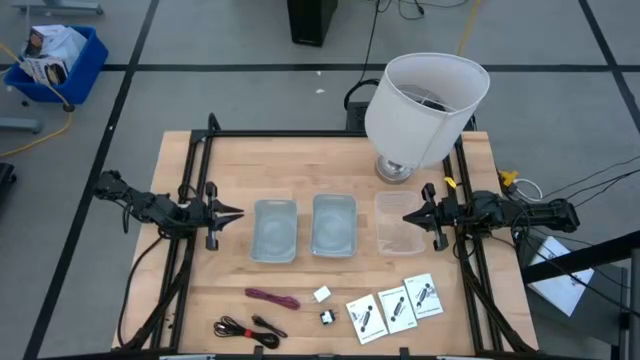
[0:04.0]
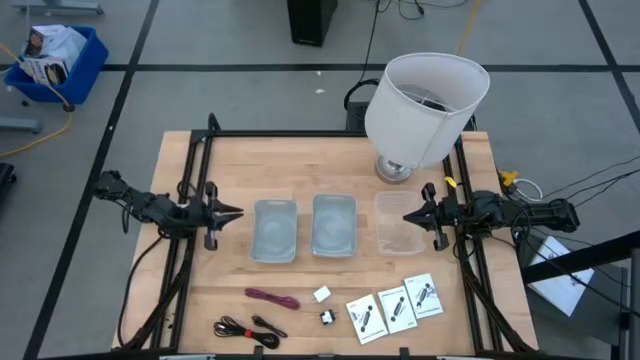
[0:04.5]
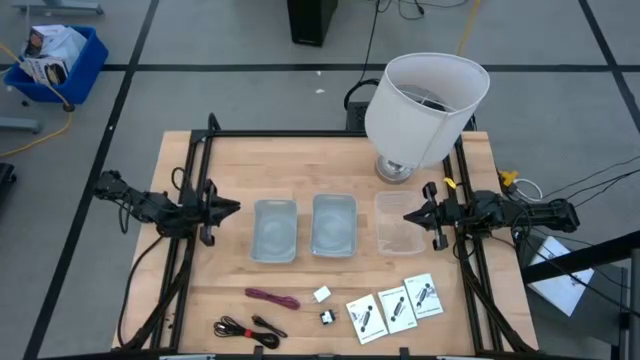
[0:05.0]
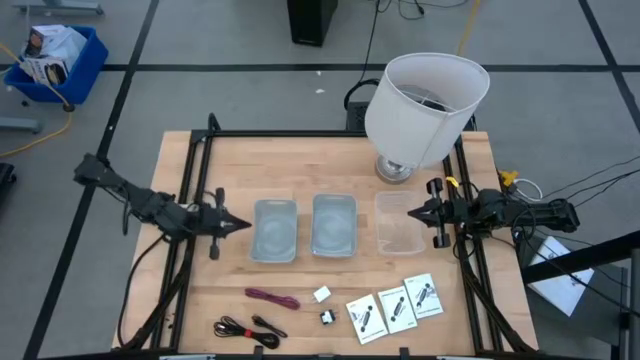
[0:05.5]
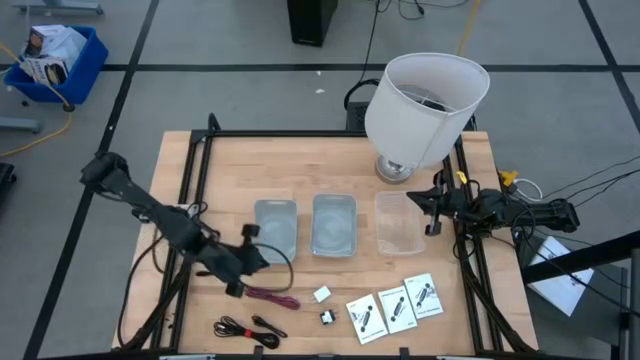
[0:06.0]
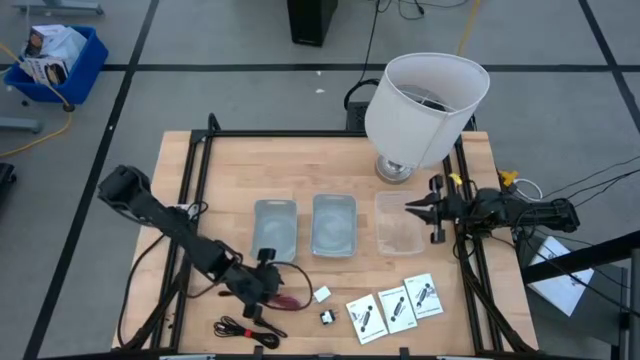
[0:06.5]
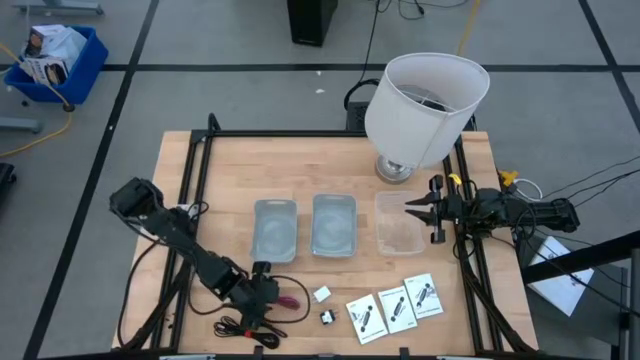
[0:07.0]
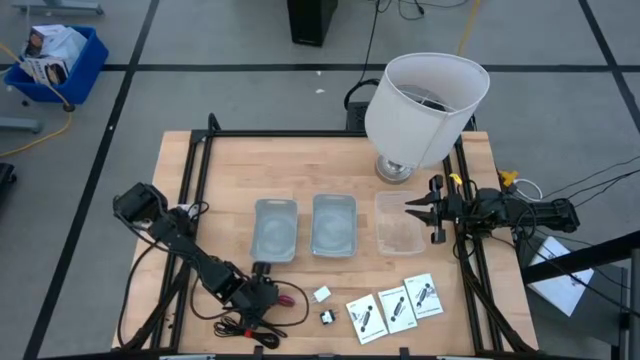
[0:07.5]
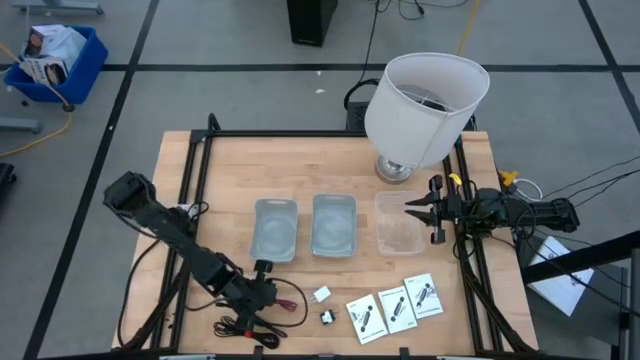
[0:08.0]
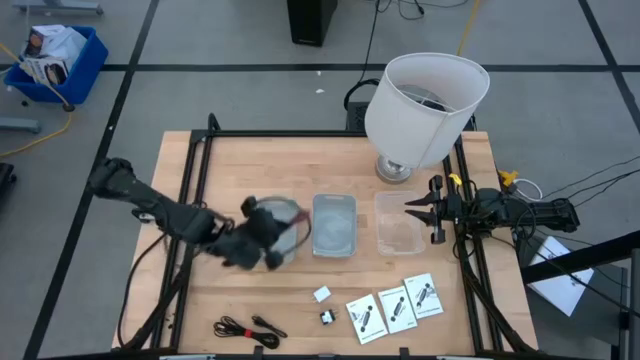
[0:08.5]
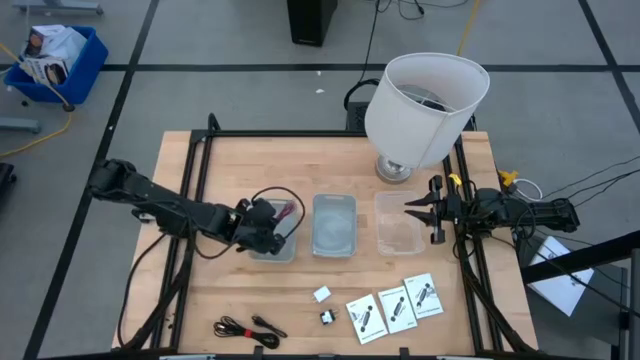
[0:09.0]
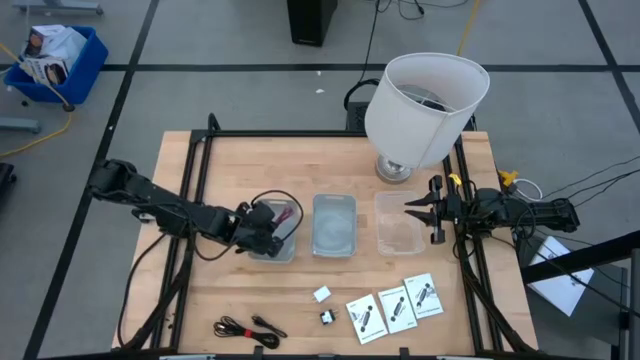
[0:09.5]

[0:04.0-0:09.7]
Task: Pick and place items into bin
Put the pink cable charger into the left gray bin

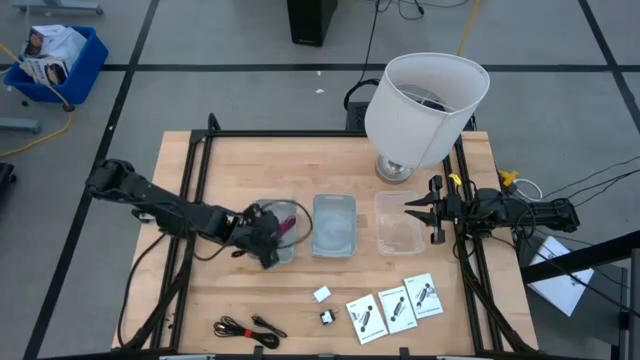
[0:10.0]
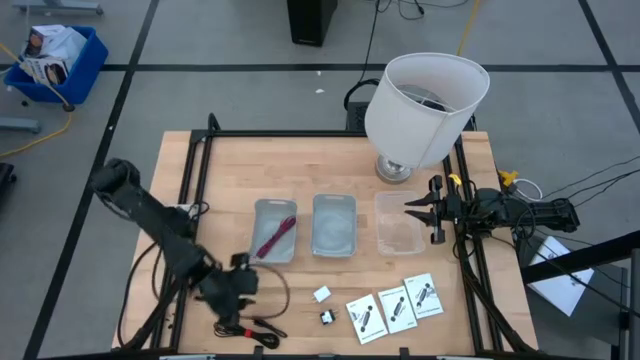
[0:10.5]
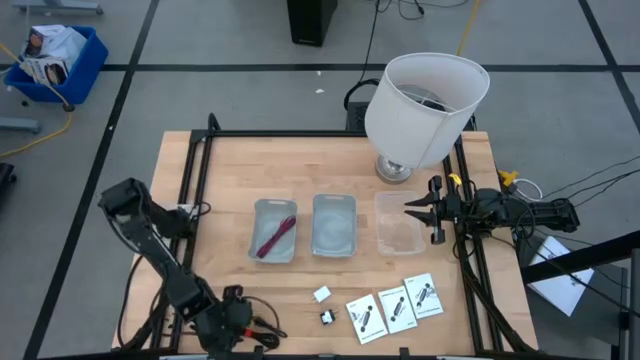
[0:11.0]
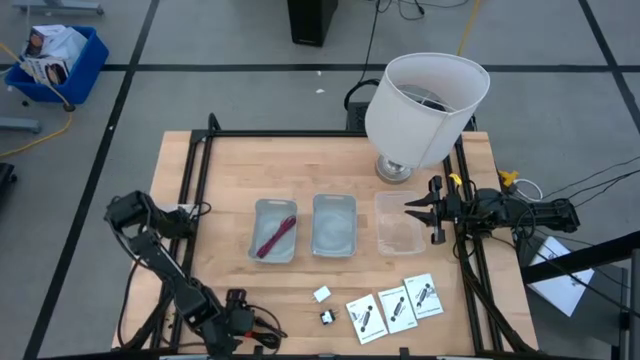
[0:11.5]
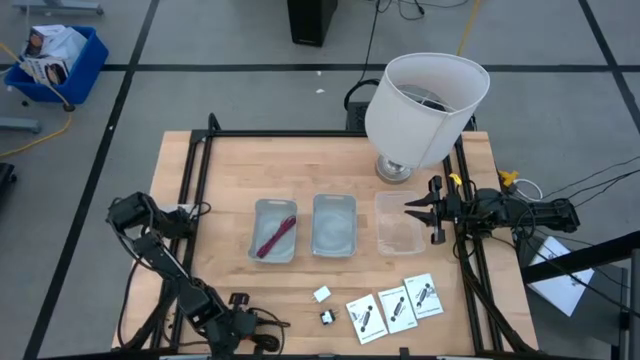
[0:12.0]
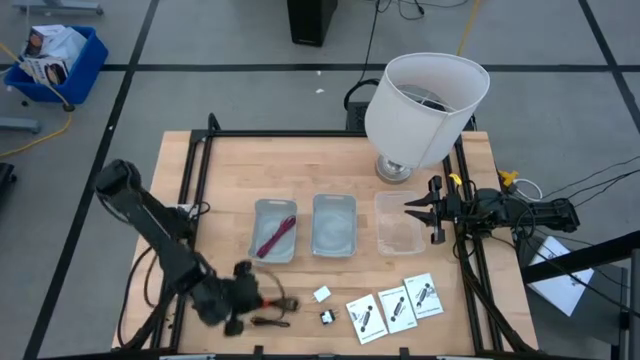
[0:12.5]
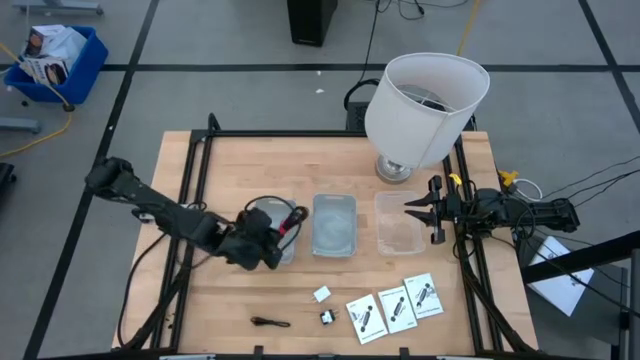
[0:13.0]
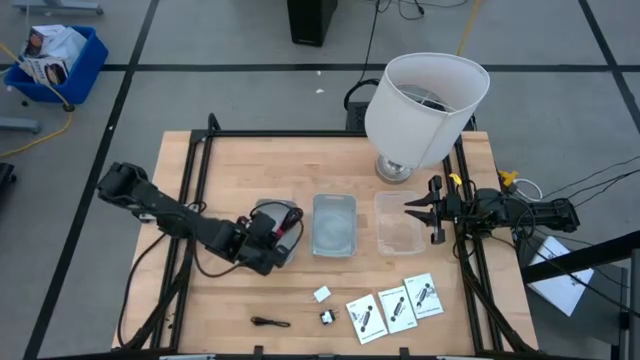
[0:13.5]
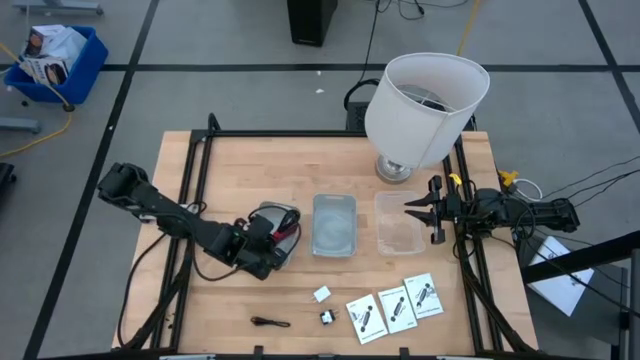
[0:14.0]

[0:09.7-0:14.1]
Put the black red cable charger into the left gray bin

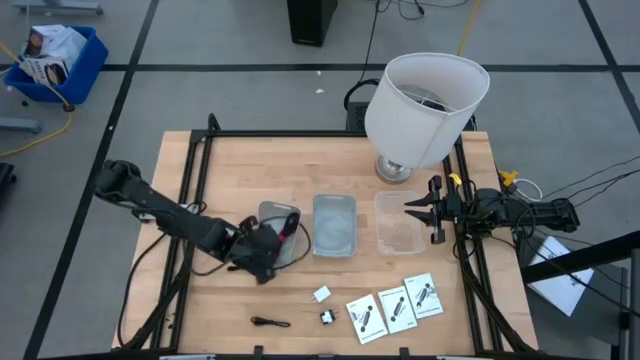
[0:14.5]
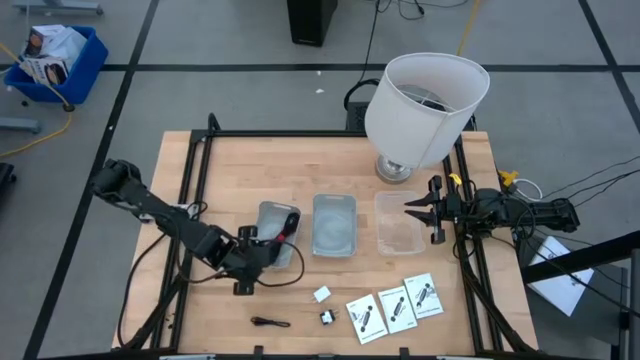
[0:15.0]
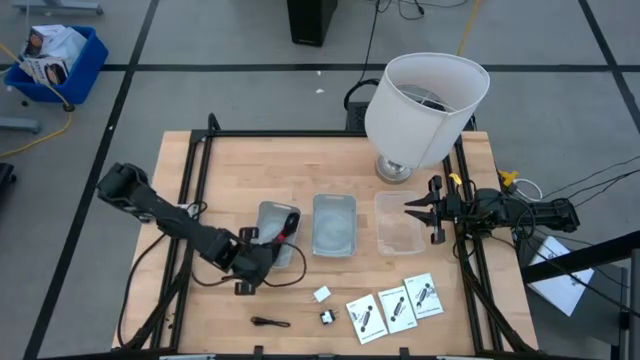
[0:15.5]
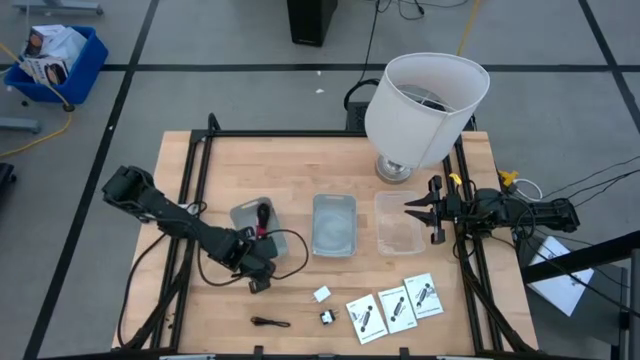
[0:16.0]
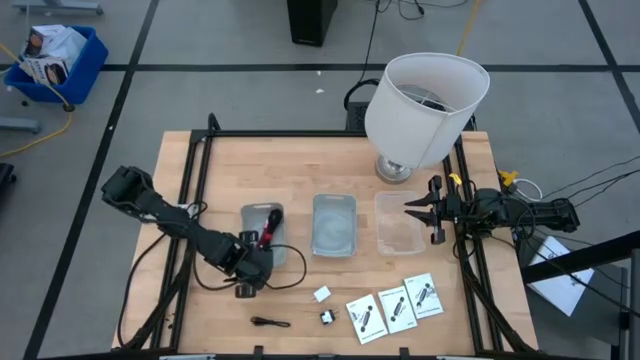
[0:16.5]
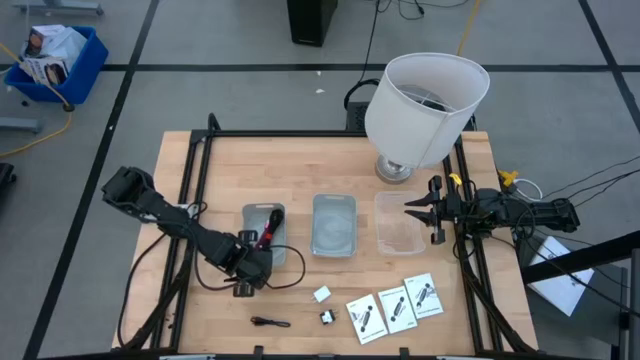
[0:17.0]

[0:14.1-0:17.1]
Adjust the left gray bin

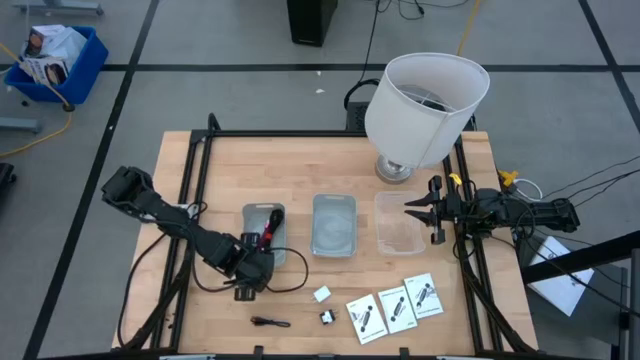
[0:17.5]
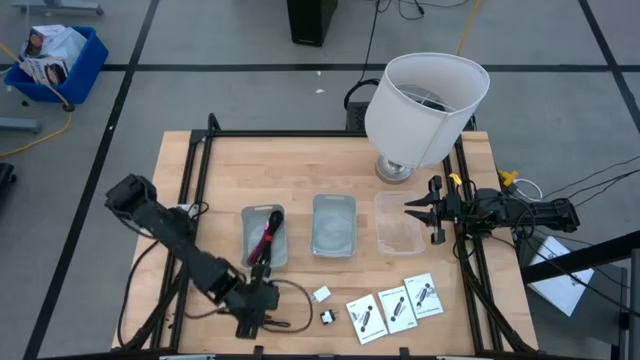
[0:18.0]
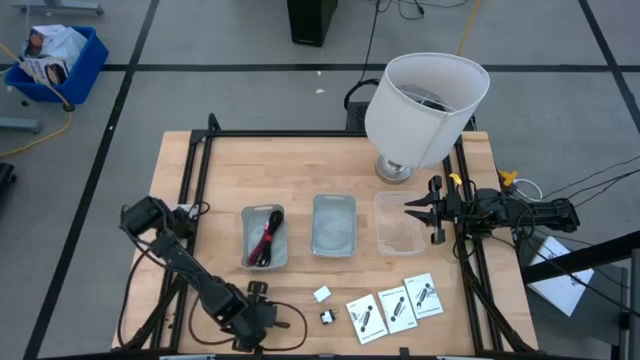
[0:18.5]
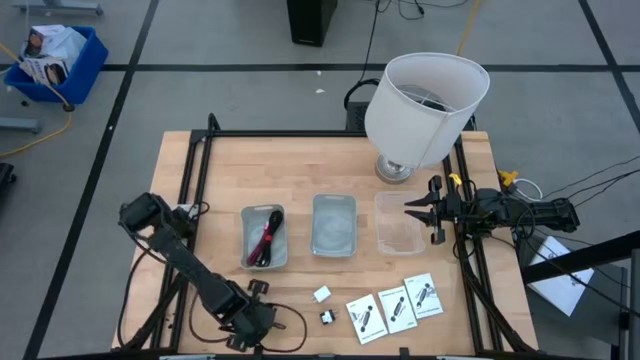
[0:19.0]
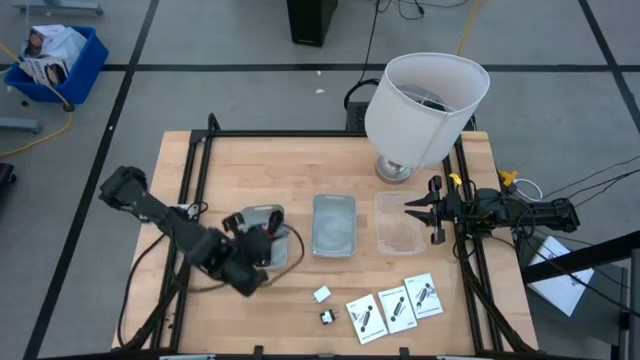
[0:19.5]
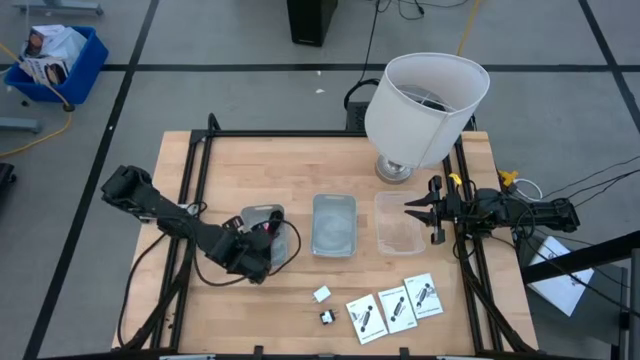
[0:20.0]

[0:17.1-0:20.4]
Put the black cable charger into the left gray bin

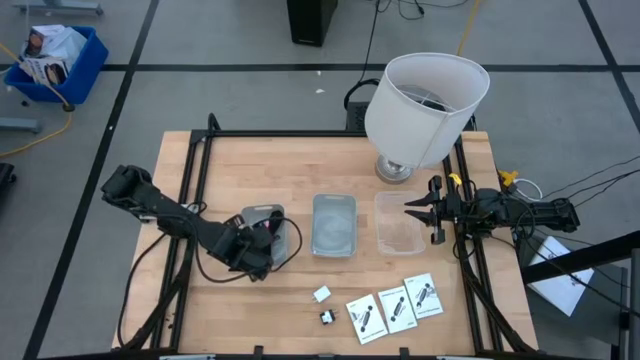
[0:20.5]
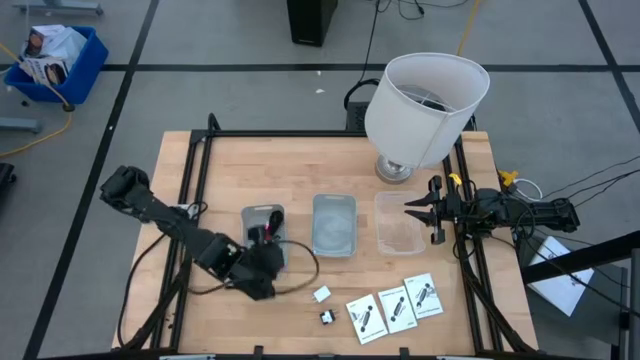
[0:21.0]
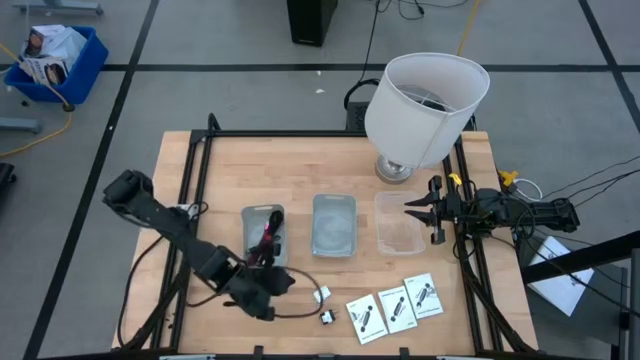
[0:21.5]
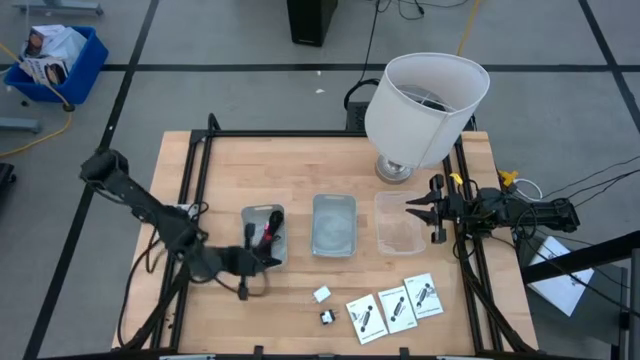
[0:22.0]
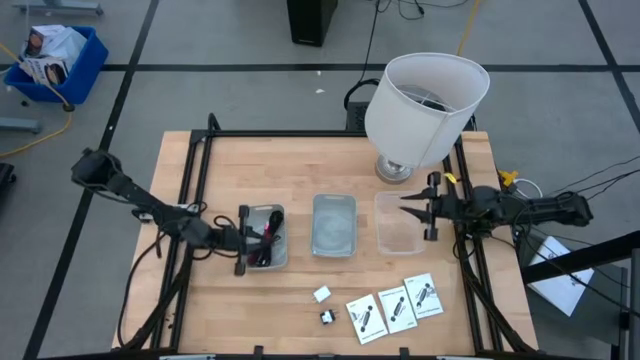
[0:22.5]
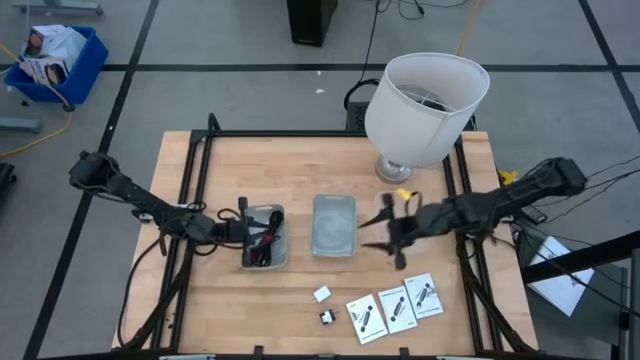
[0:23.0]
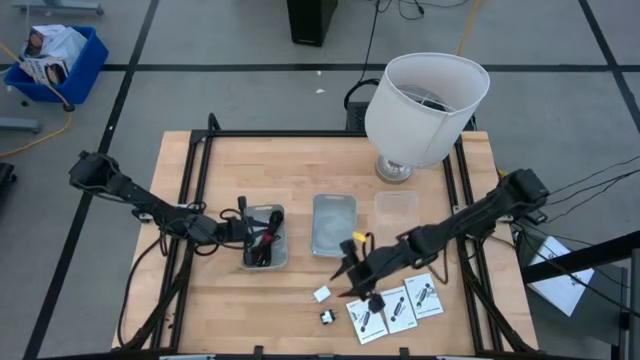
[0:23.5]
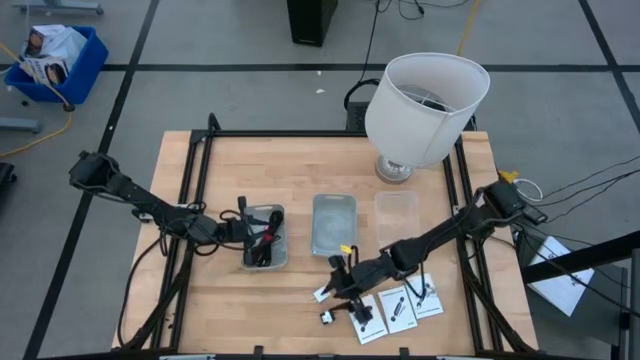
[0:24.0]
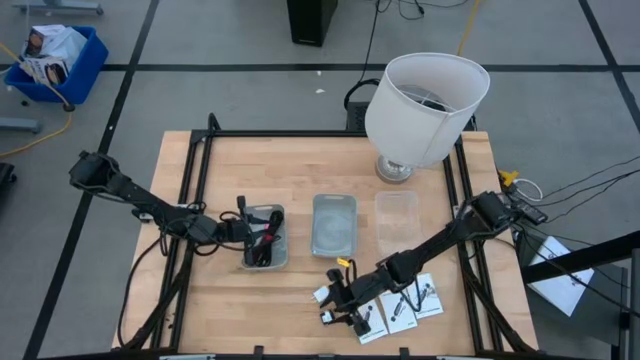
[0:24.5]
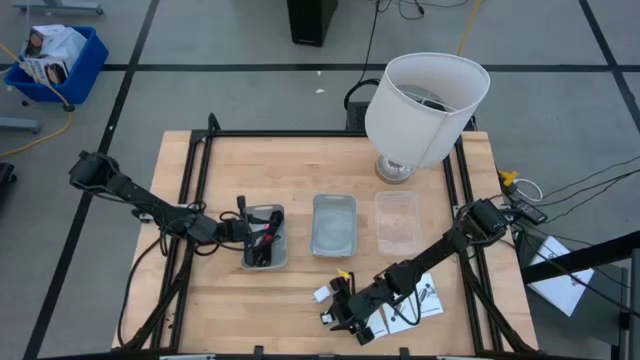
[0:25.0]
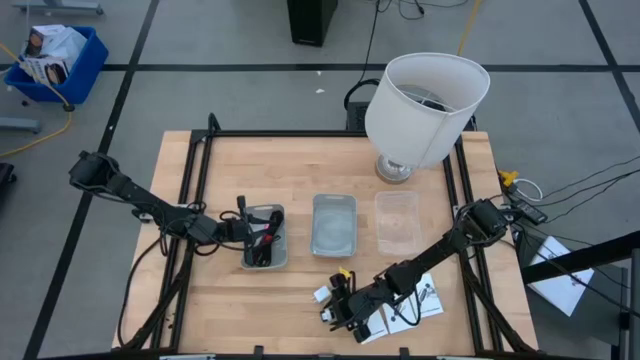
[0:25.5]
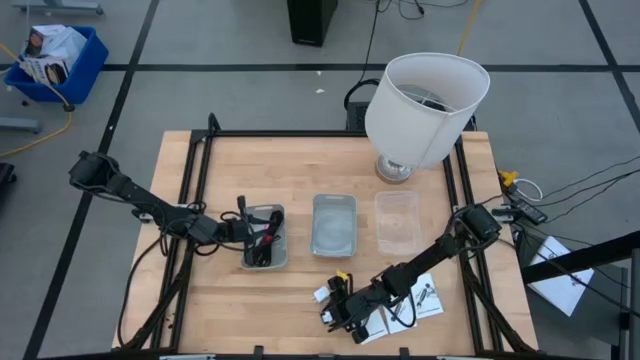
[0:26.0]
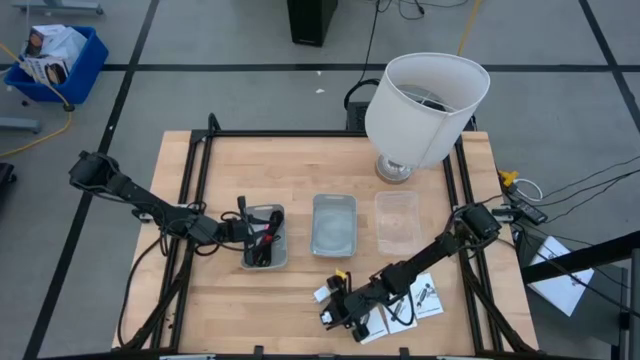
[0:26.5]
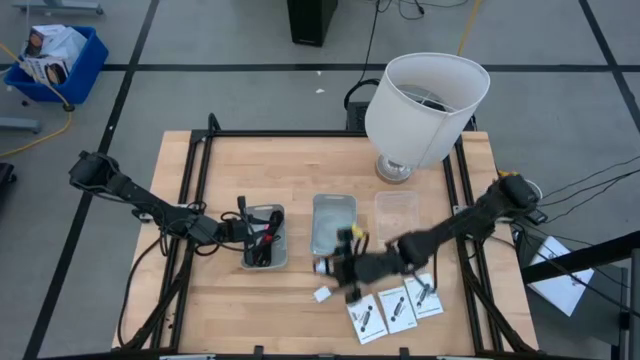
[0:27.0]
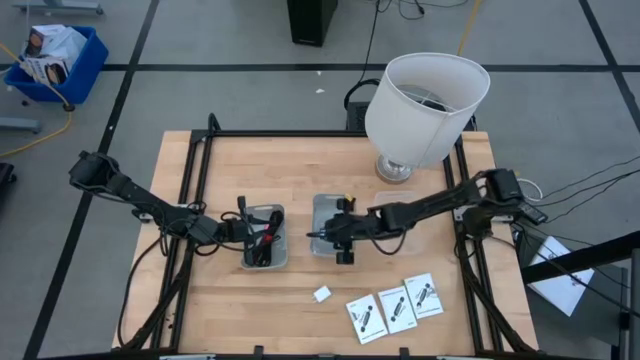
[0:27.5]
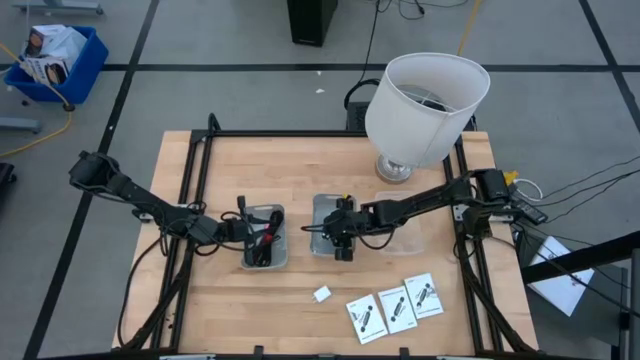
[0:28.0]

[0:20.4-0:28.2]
Put the black charger adapter into the right gray bin
